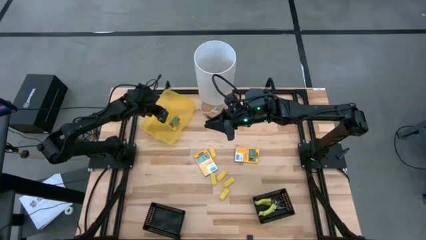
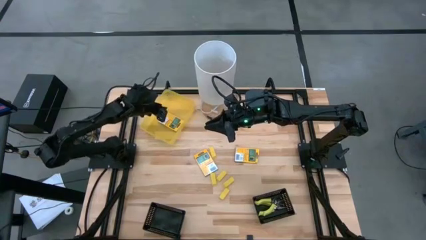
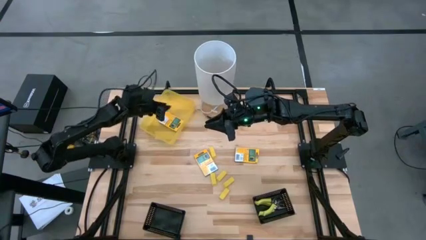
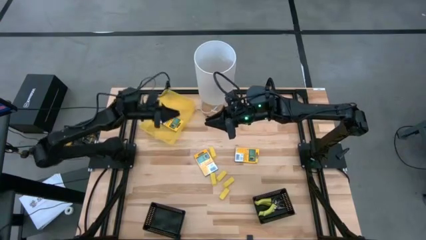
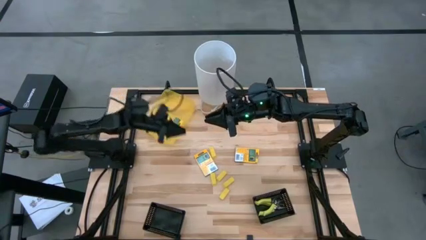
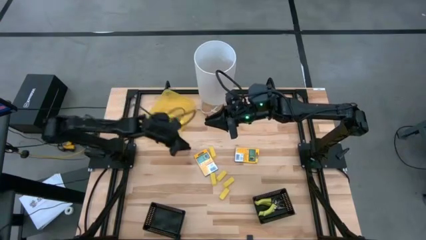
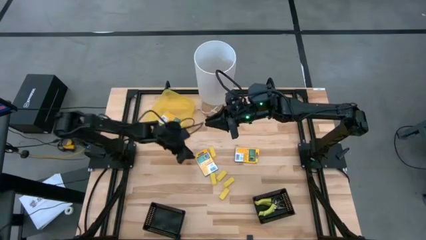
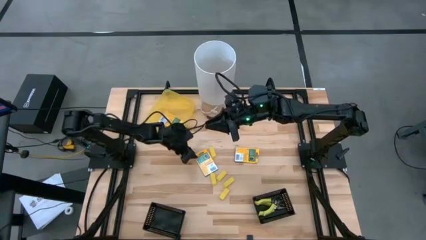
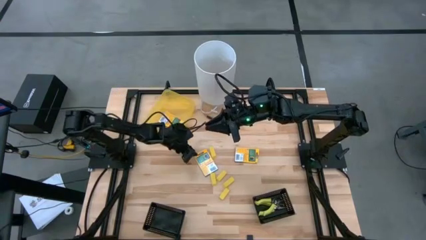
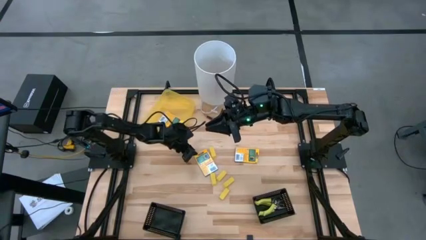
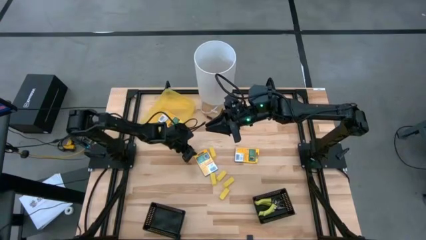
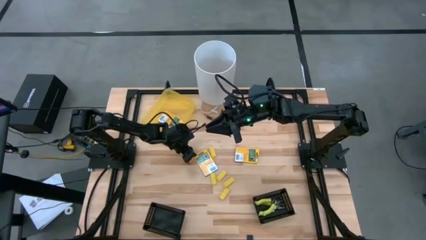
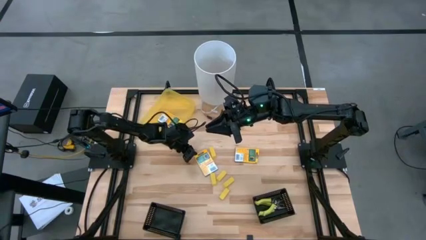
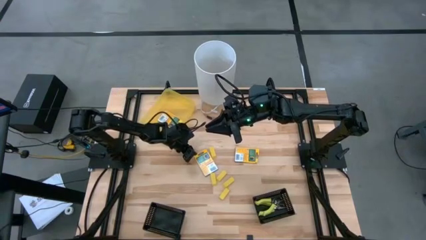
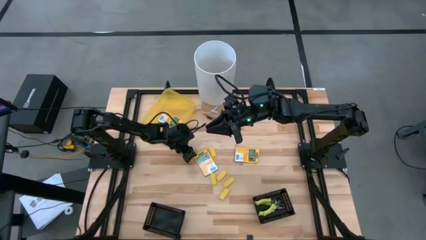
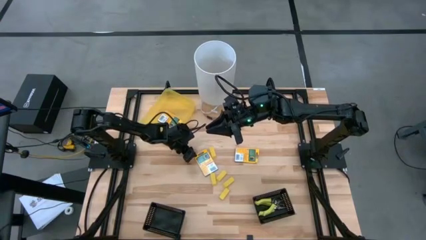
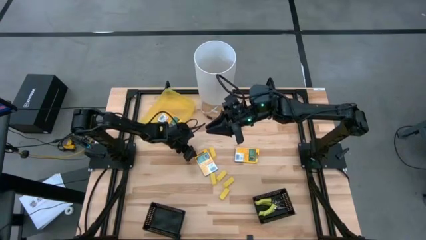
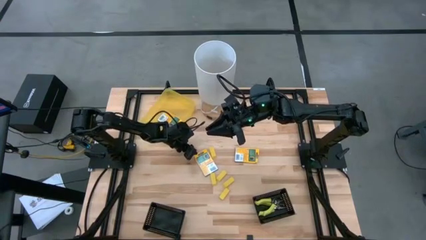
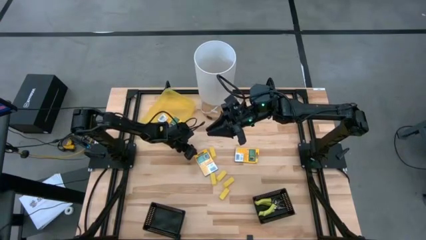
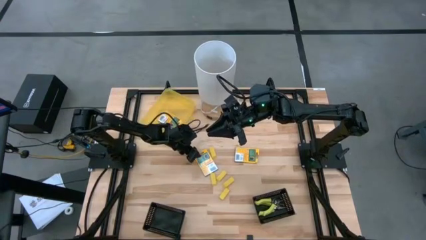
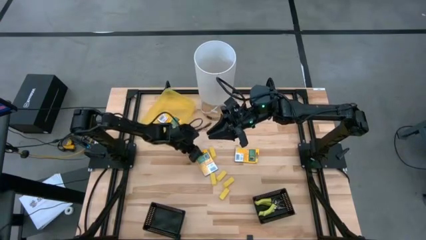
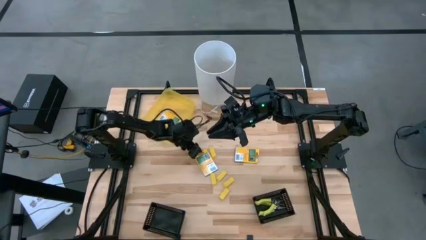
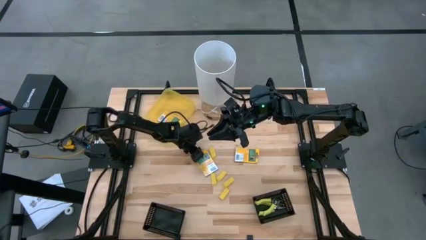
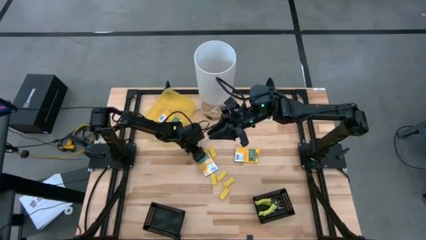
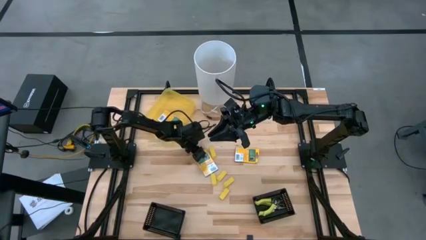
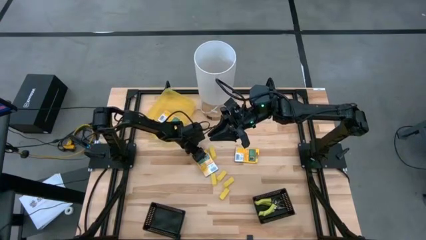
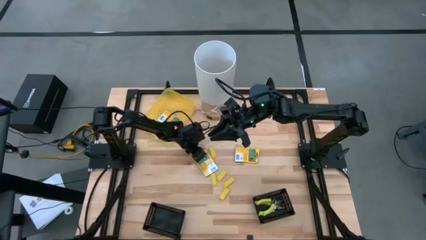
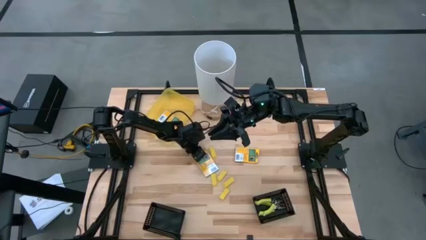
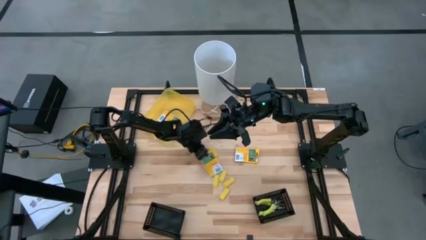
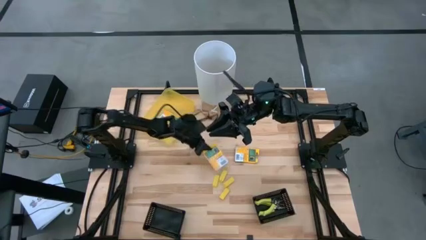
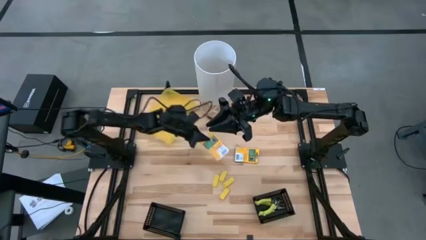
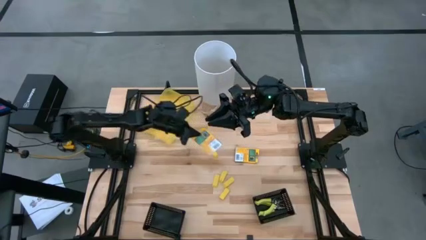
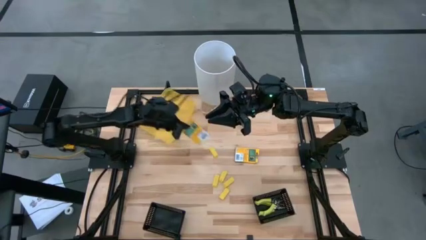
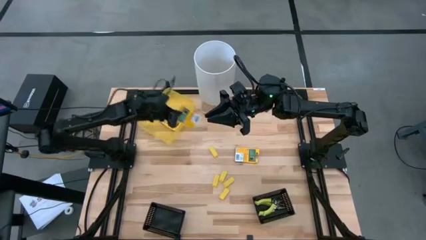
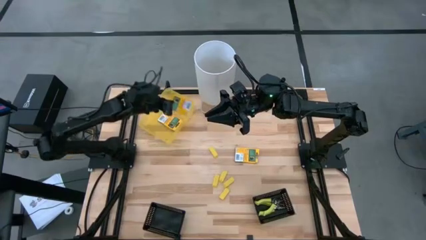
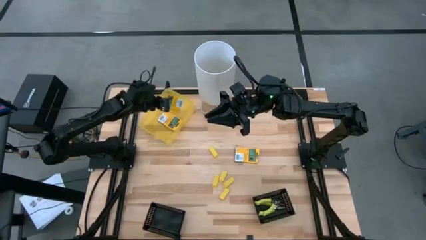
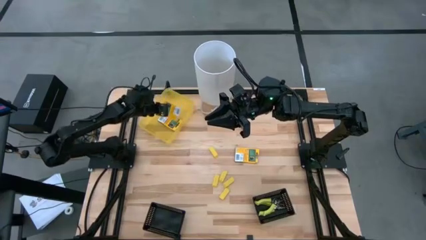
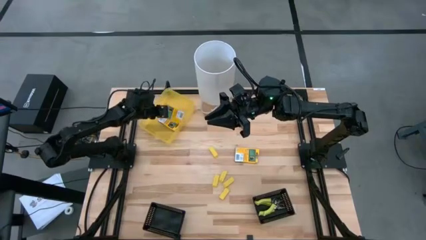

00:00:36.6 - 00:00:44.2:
Task: Pick & Place School Supplies
Put the crayon box into the yellow bin

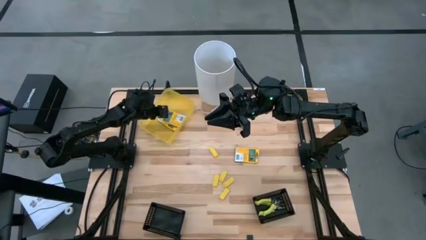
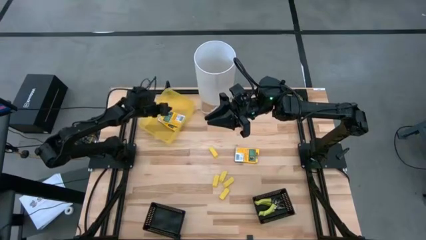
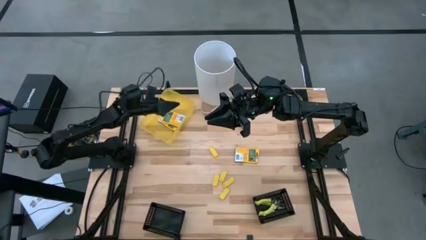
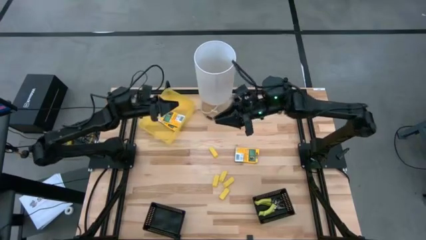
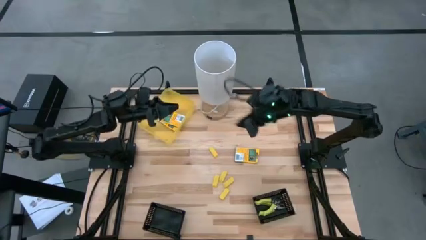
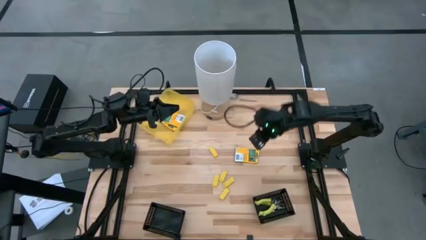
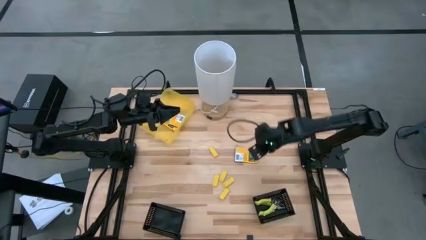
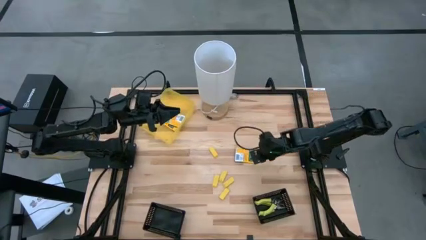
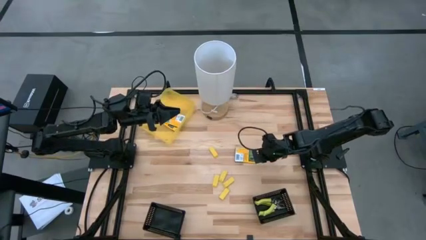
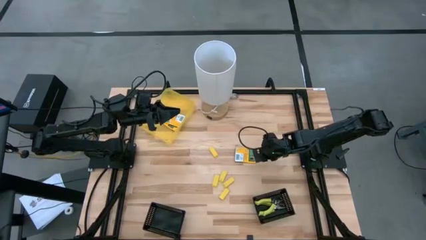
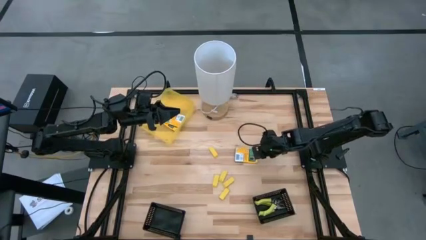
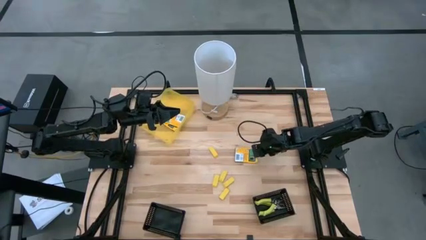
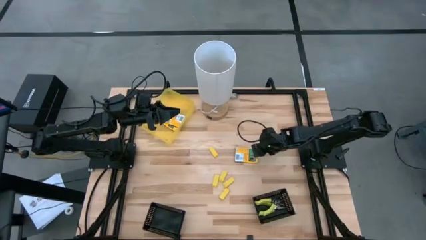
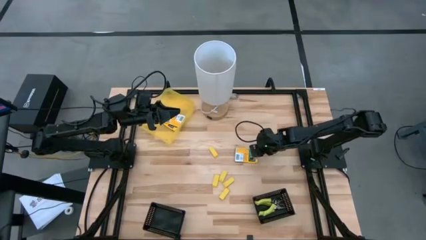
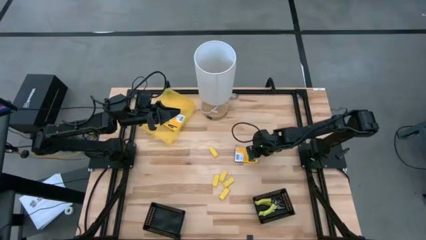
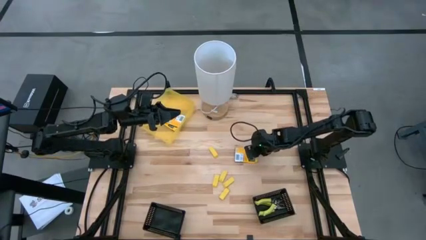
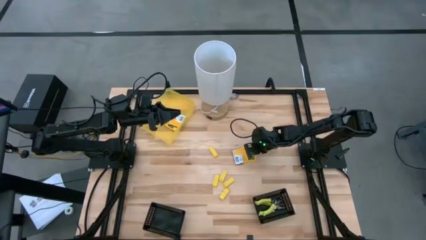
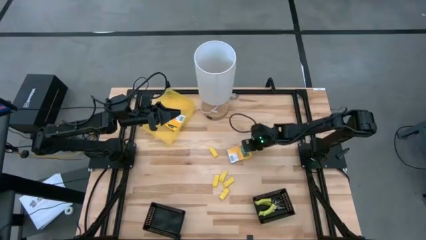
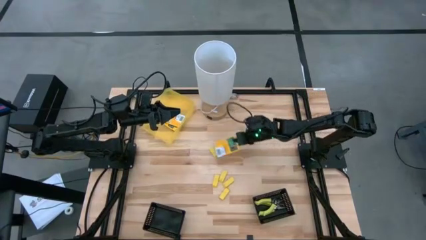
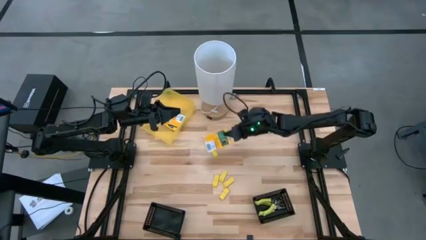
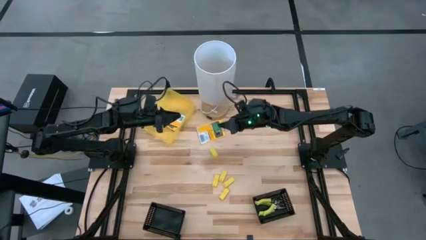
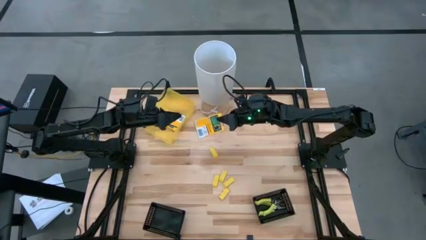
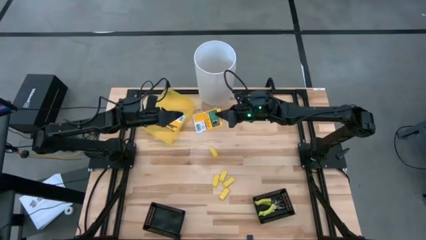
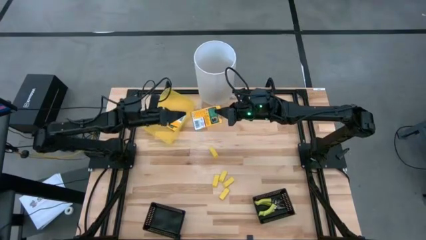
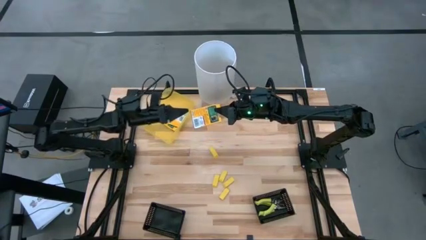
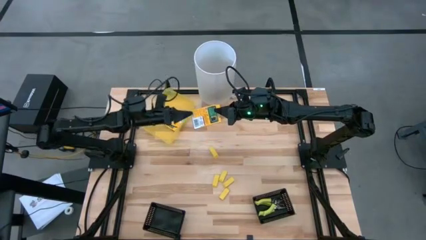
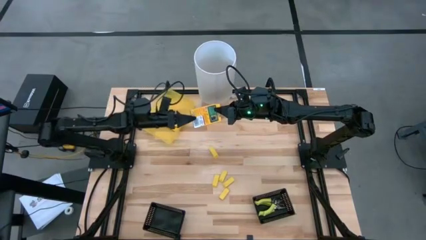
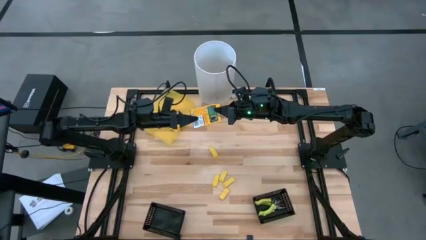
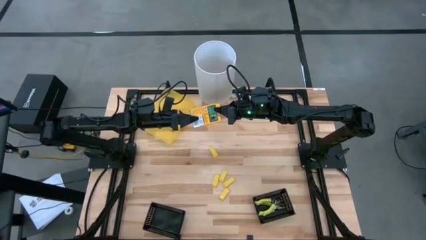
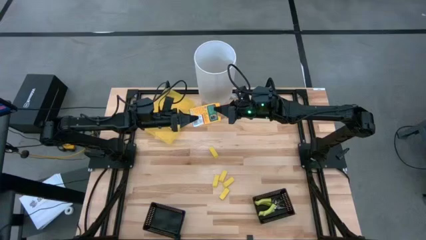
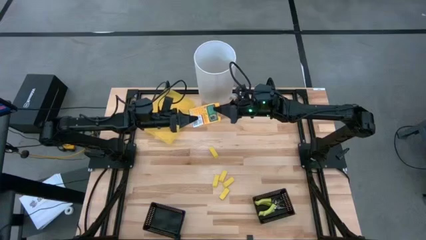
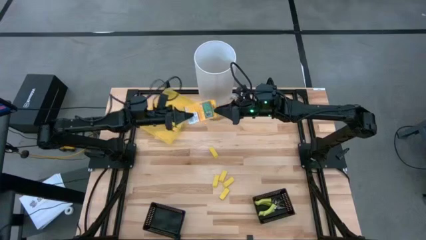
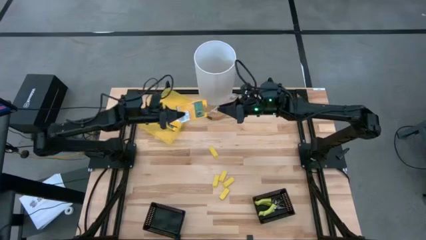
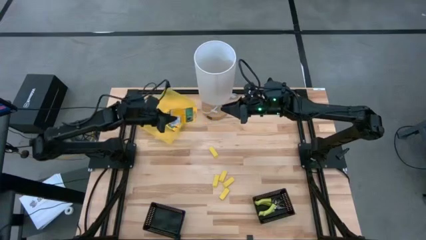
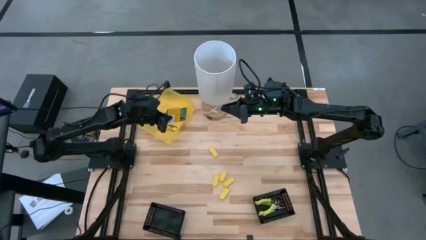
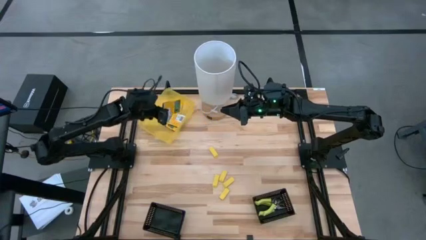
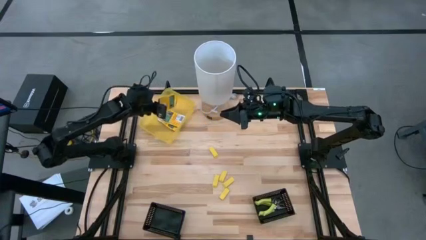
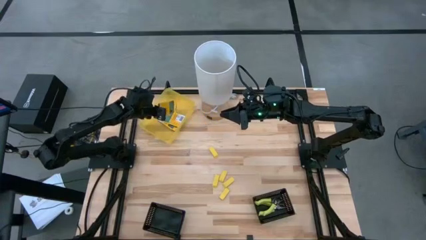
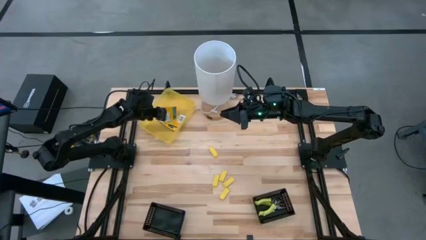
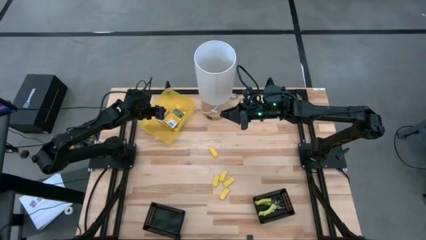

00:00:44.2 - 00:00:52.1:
Put the crayon box into the yellow bin
